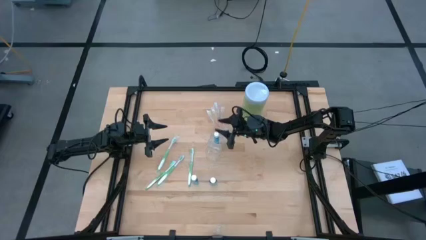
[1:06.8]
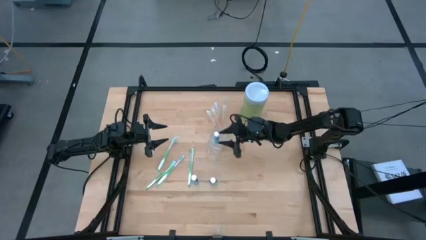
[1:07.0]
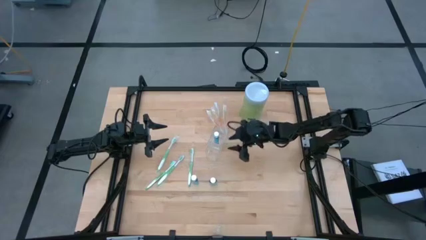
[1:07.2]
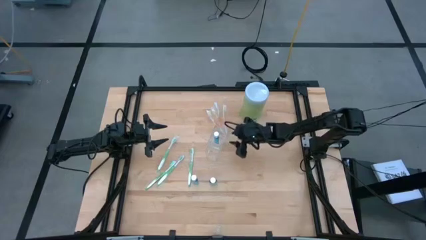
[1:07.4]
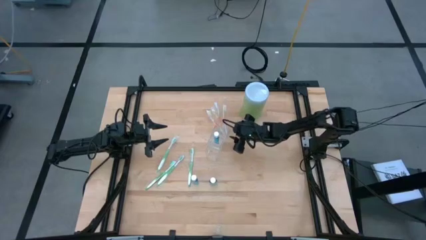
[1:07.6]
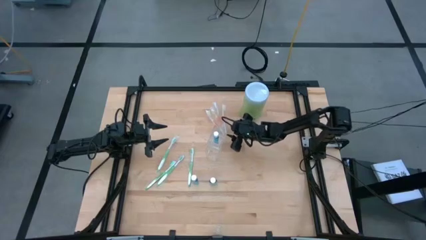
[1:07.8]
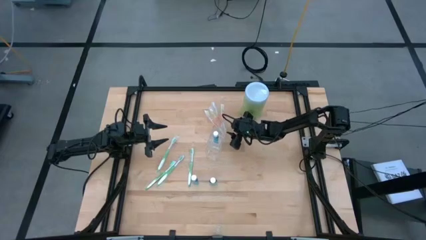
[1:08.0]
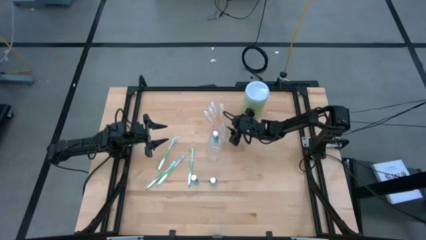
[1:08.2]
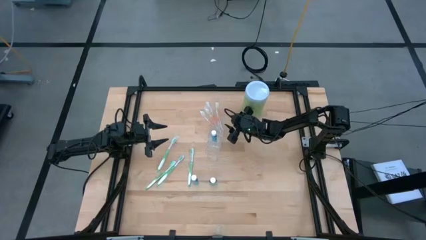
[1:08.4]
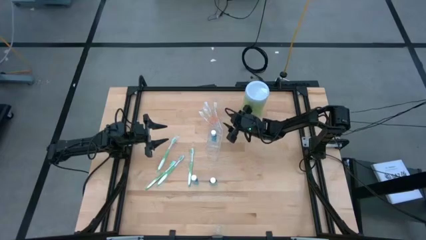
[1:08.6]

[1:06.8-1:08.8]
Task: Pick & Place toothbrushing station
Adjust the transparent organizer

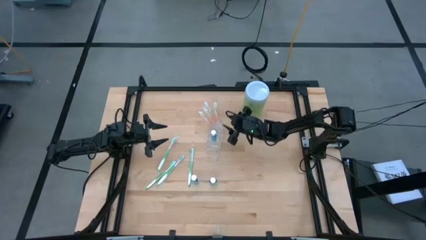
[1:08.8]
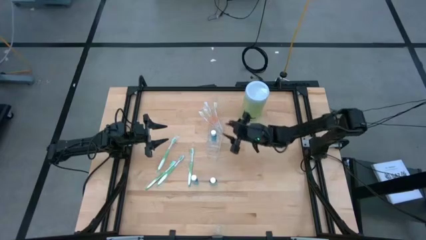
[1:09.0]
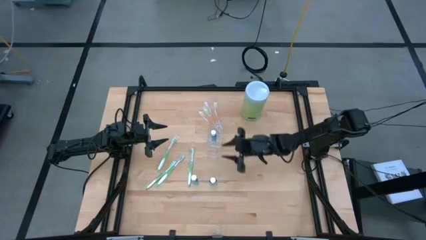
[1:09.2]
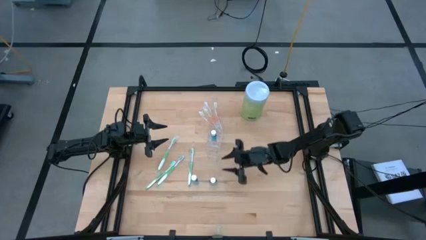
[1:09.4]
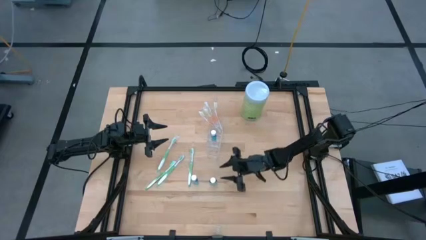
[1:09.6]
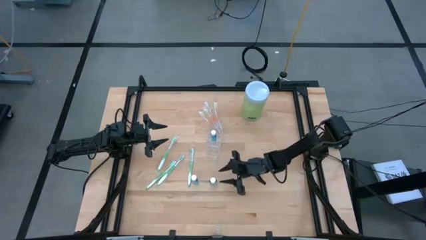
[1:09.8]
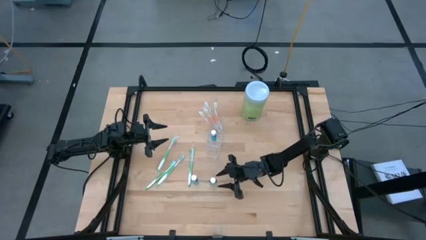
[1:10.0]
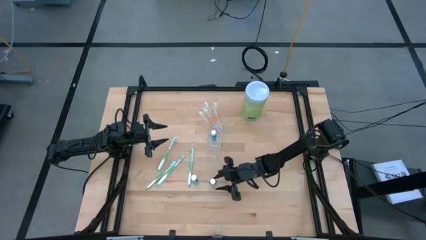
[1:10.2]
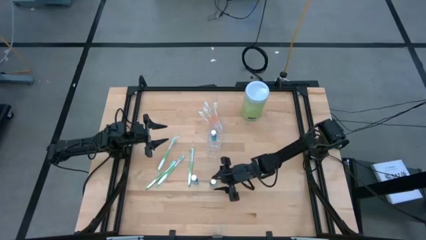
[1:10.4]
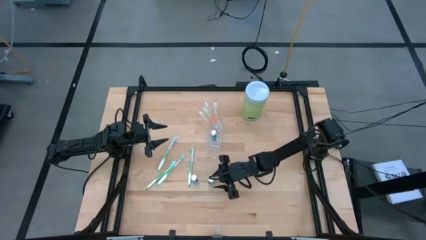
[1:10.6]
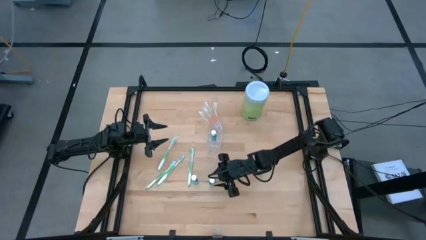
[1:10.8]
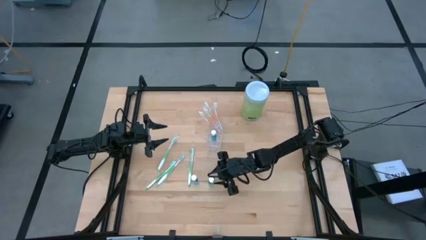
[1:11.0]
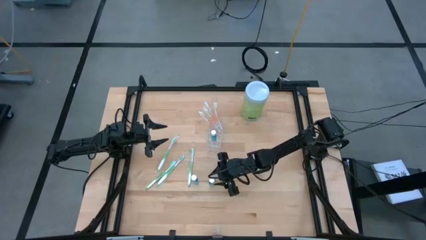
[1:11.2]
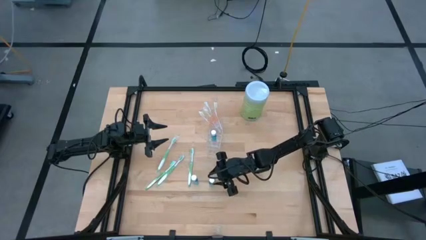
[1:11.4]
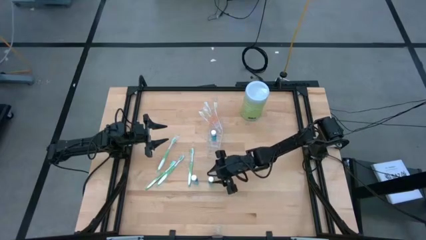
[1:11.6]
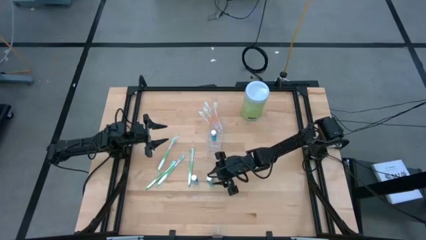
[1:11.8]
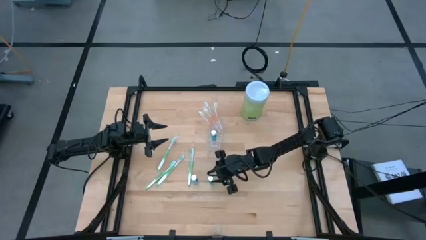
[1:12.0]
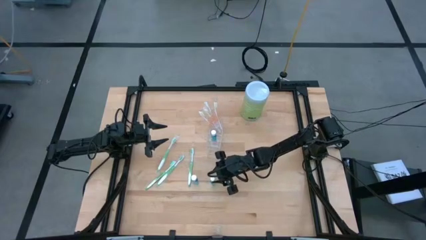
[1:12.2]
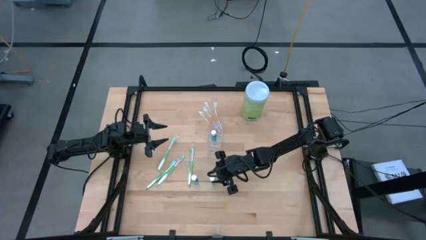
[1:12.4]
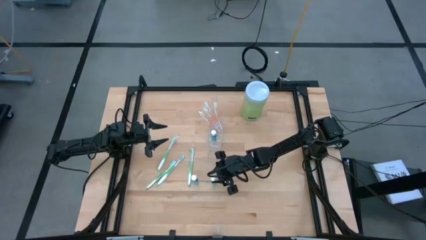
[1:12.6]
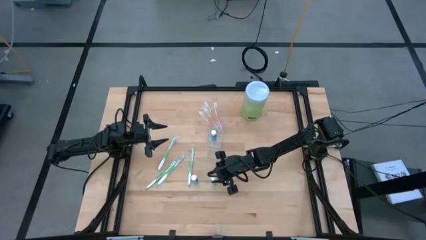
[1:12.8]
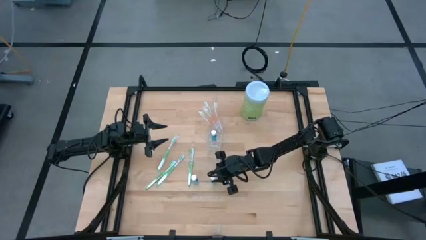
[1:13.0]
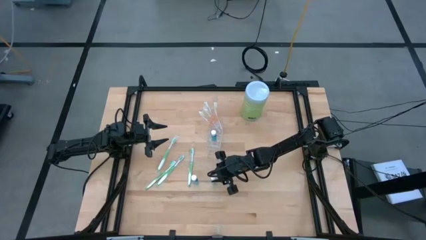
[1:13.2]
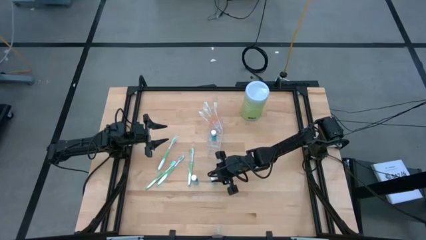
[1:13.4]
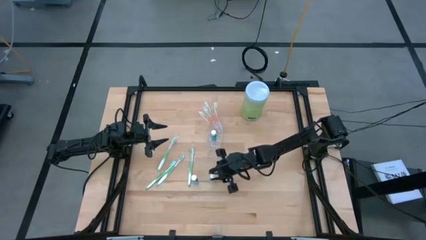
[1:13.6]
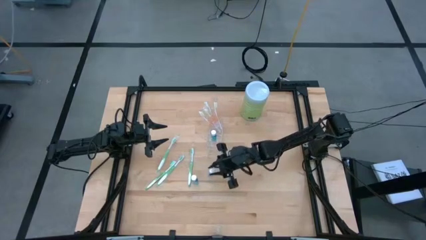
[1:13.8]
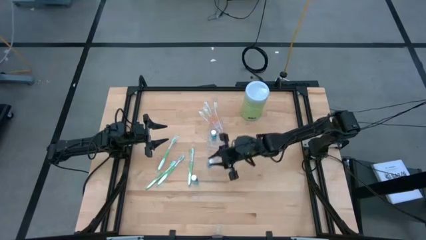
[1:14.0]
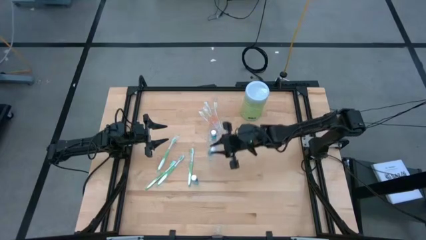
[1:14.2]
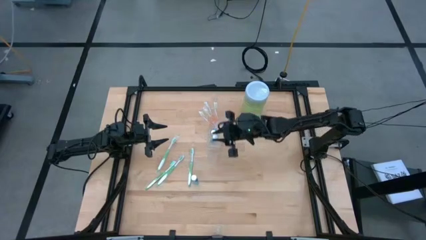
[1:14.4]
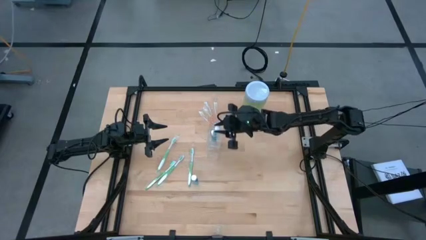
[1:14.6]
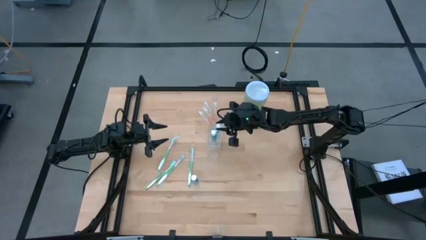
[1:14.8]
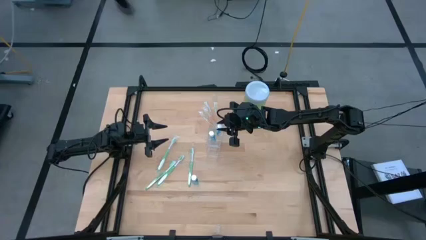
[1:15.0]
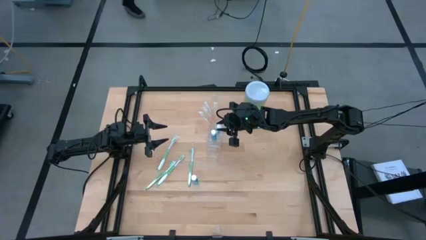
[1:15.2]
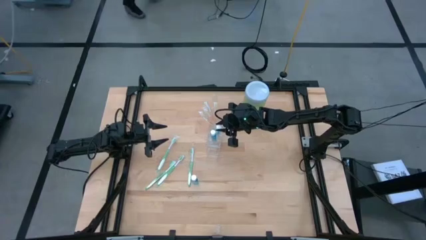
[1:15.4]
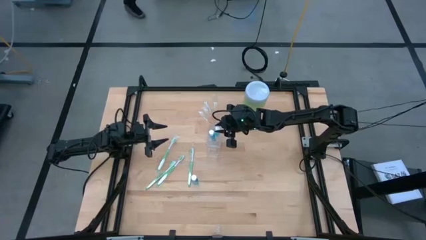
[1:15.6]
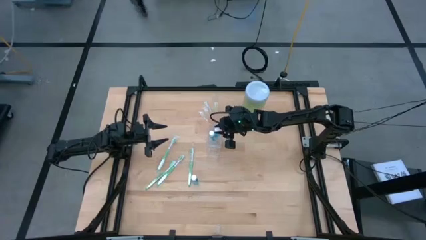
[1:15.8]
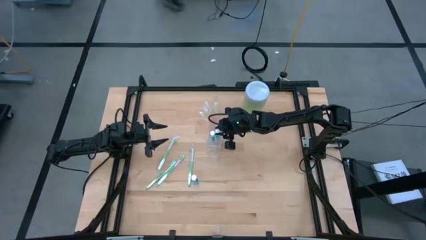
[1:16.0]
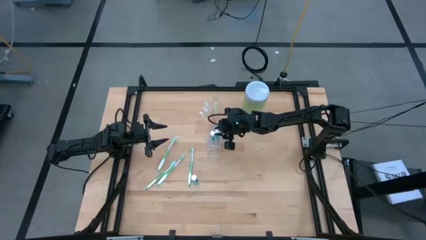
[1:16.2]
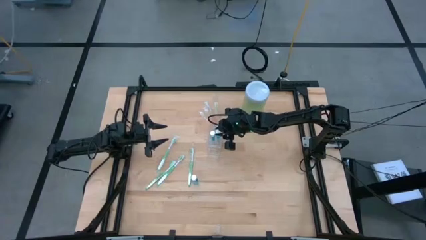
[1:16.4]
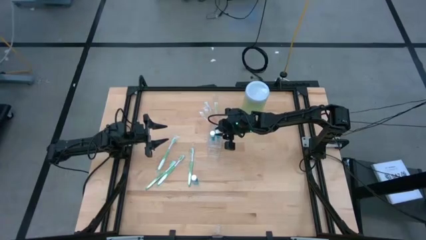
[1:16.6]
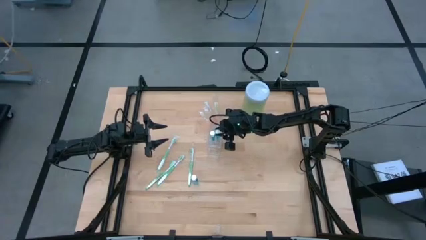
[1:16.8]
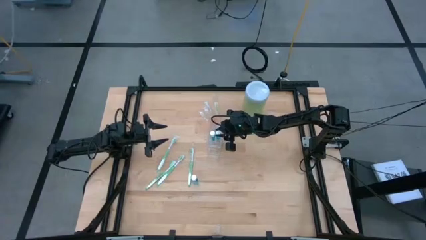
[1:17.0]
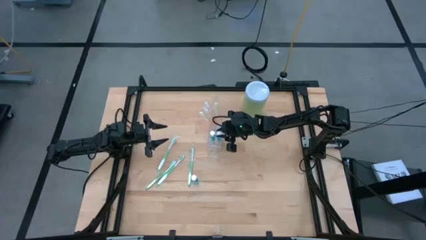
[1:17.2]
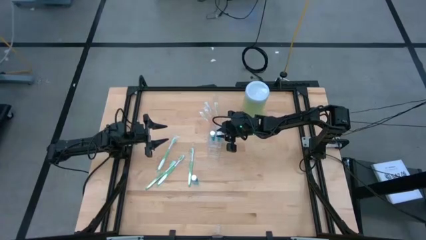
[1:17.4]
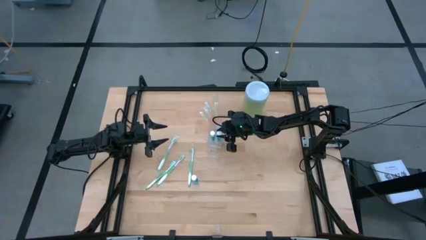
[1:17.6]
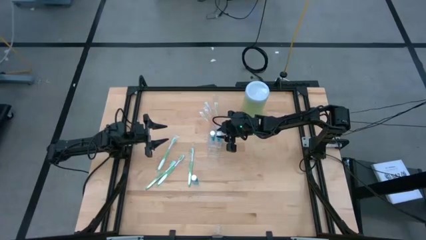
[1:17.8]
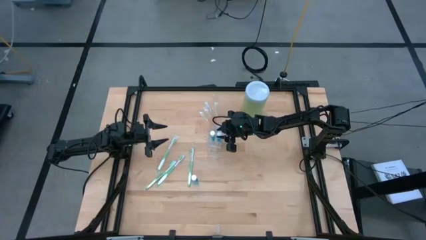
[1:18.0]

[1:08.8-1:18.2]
Put the blue mouthwash into the middle portion of the transparent organizer
